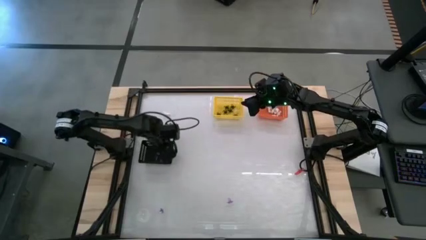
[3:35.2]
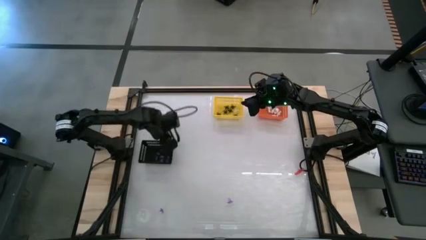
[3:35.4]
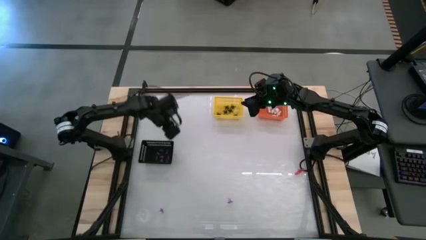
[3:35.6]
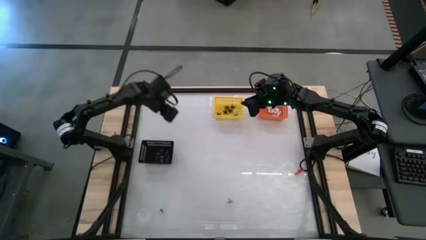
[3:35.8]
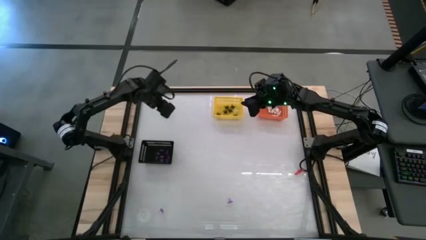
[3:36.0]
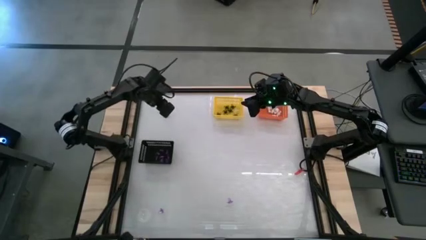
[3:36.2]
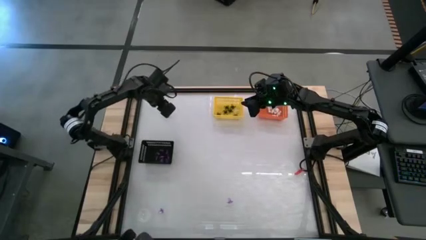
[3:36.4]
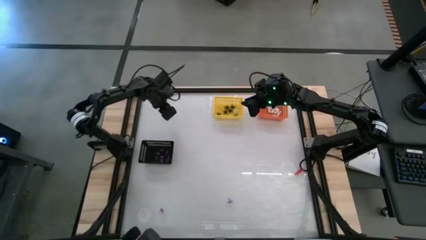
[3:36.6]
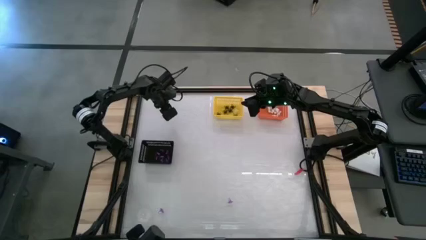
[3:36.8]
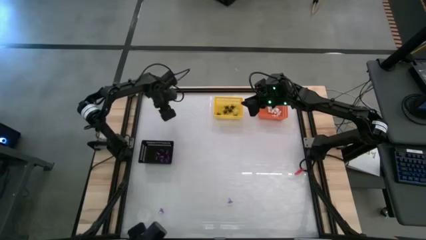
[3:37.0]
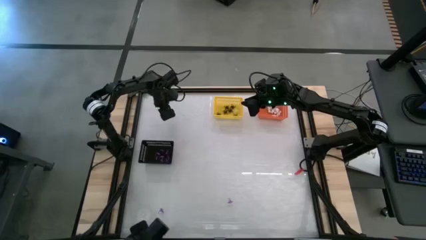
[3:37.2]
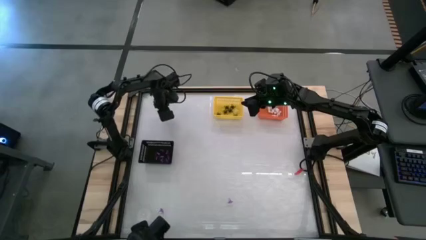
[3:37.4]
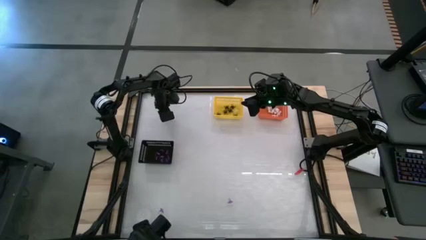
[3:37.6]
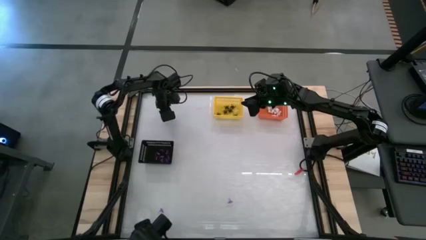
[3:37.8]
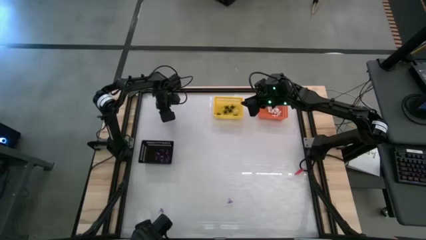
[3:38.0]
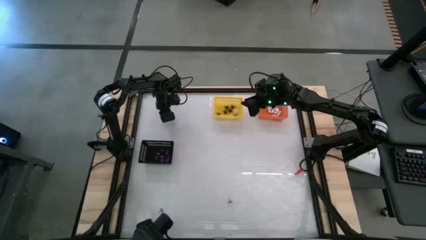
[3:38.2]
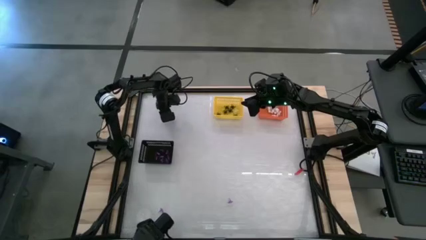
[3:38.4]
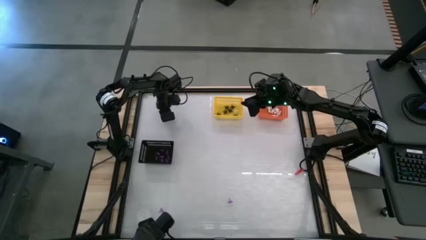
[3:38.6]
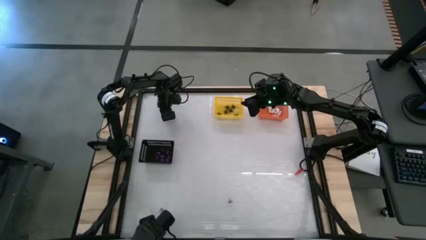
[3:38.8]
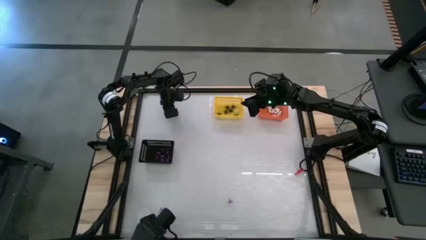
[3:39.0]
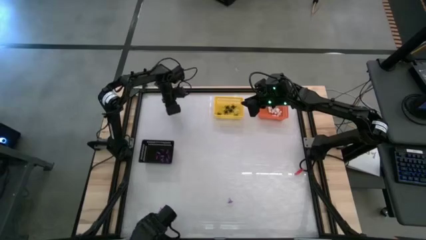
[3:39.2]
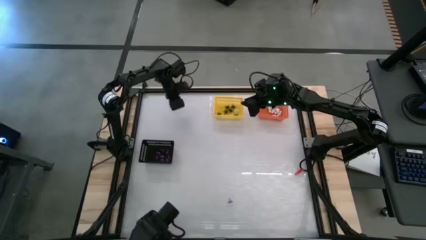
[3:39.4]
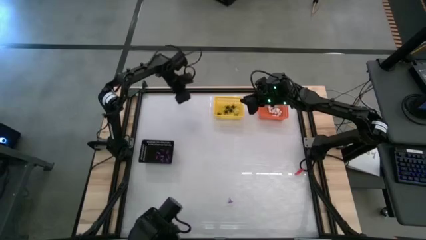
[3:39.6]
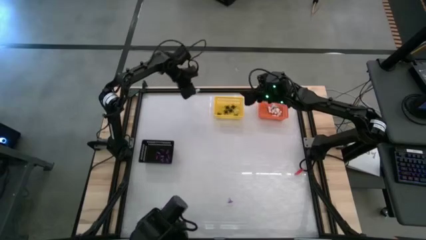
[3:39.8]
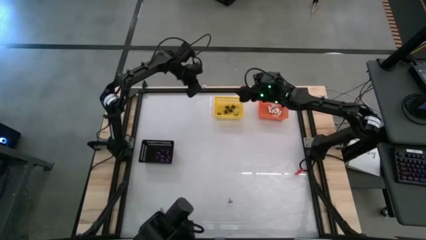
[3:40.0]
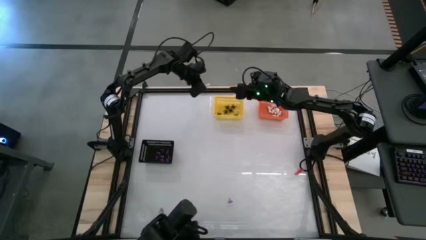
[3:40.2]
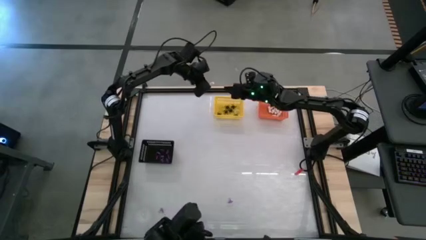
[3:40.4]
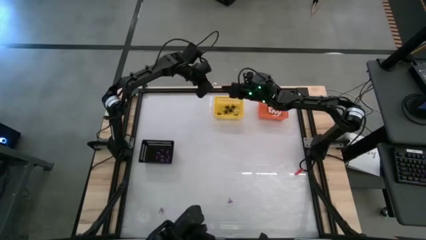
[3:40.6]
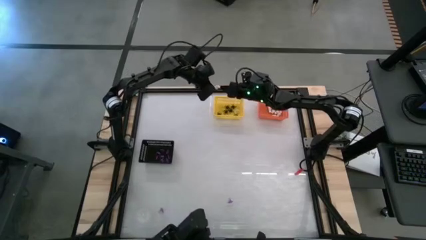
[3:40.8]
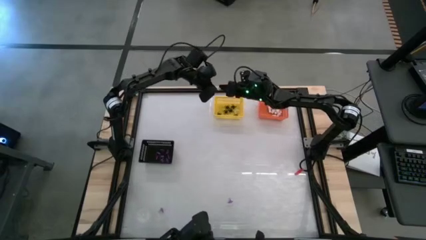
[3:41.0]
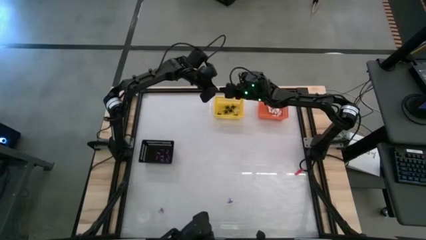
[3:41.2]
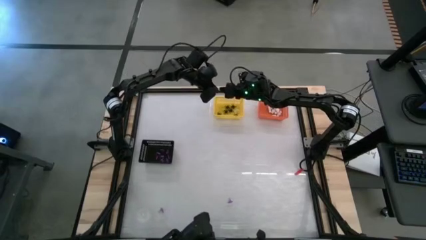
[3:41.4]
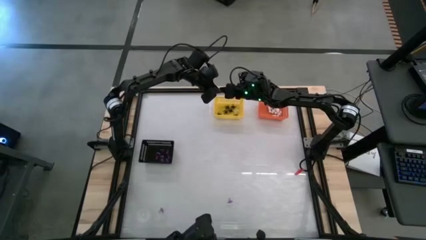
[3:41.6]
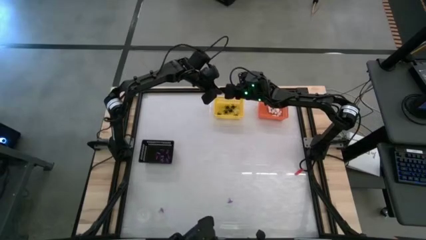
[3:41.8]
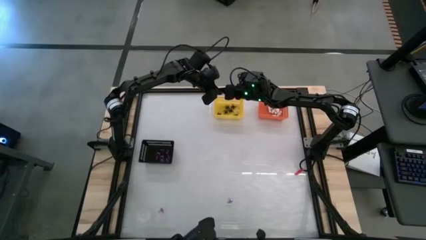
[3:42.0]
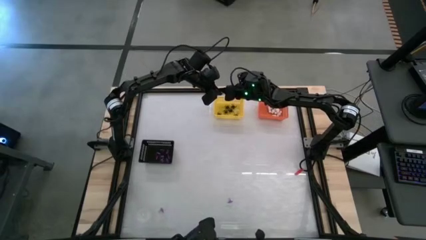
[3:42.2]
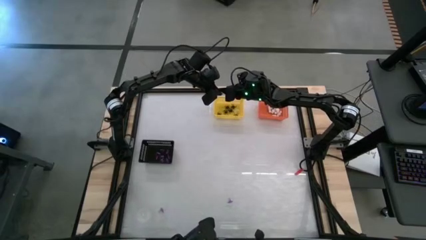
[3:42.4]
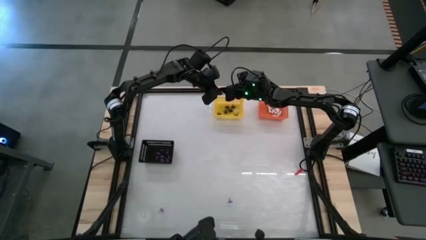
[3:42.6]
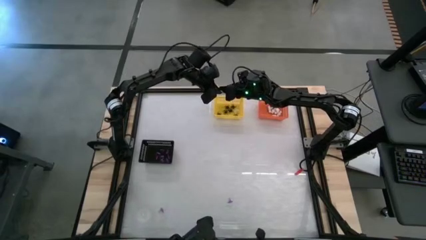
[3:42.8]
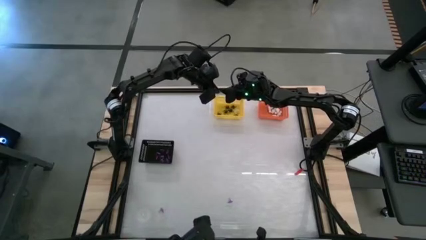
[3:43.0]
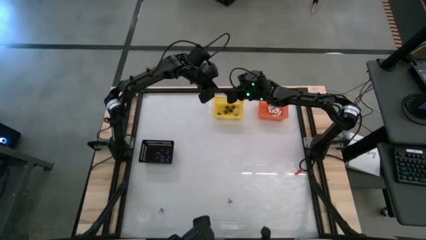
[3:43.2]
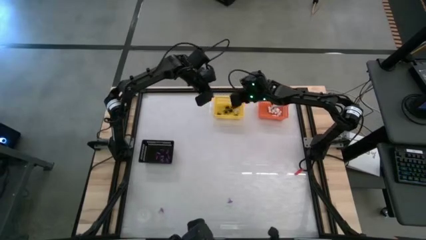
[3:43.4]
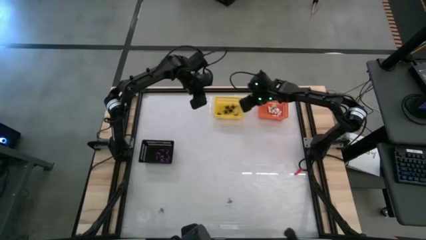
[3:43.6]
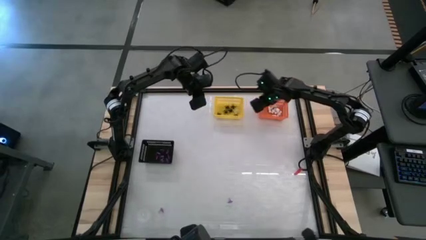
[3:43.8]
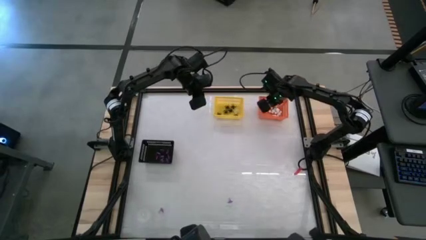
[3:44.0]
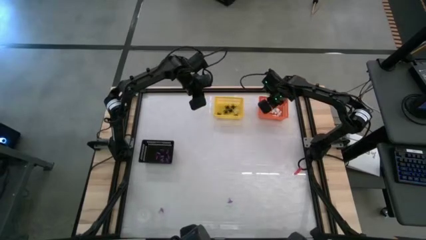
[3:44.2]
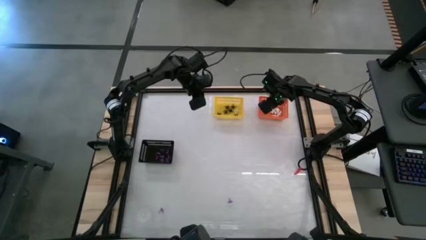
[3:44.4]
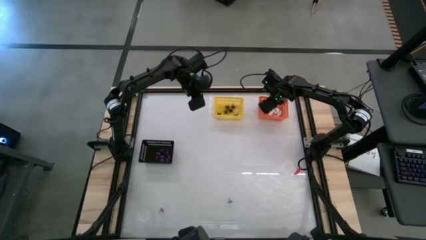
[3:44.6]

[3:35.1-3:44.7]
Task: Sort Halloween decoration
Put the white skeleton toy into the orange bin

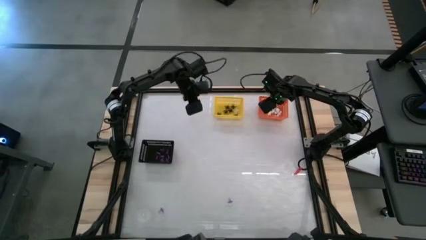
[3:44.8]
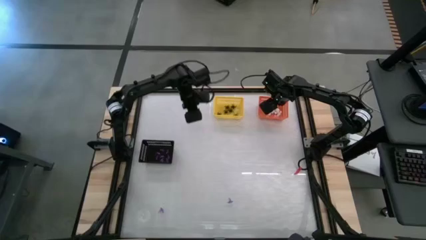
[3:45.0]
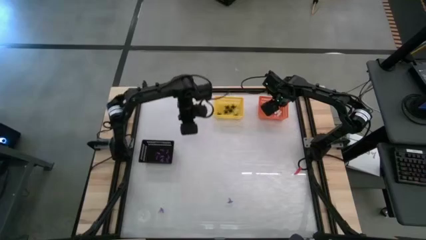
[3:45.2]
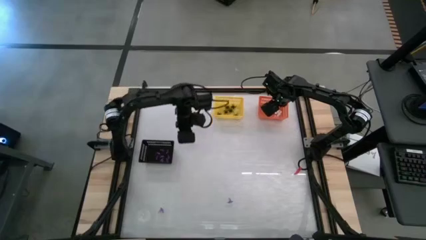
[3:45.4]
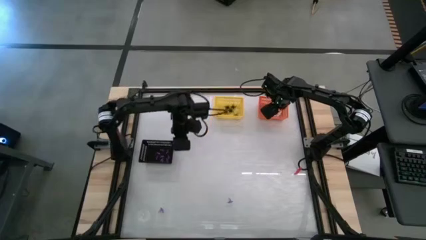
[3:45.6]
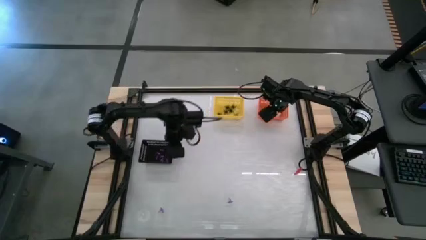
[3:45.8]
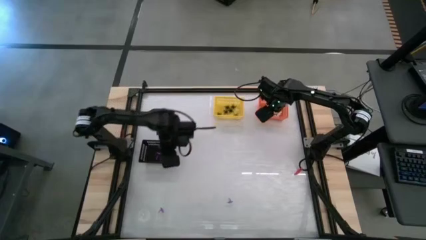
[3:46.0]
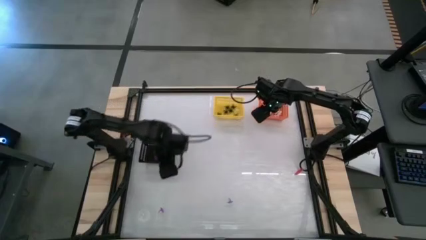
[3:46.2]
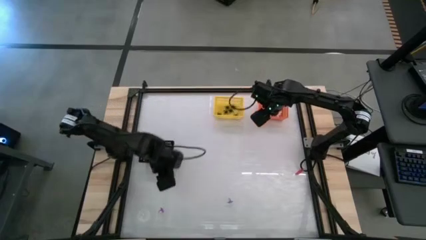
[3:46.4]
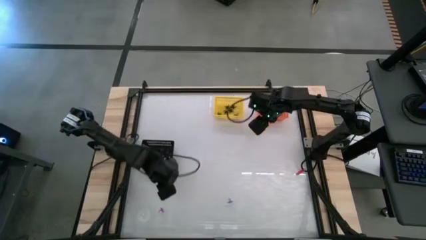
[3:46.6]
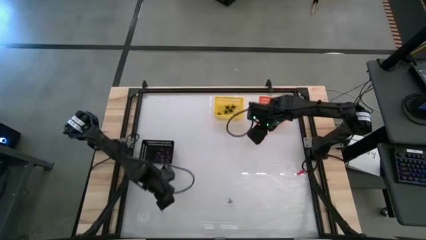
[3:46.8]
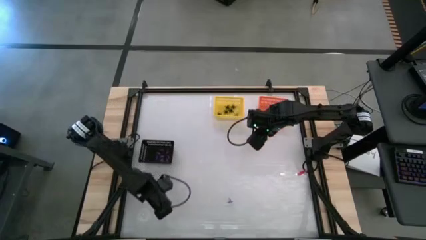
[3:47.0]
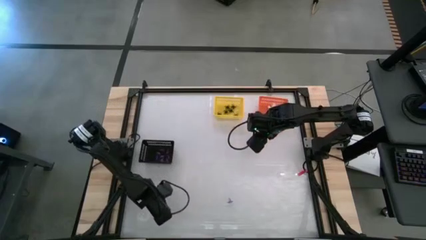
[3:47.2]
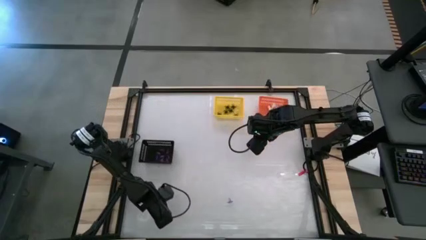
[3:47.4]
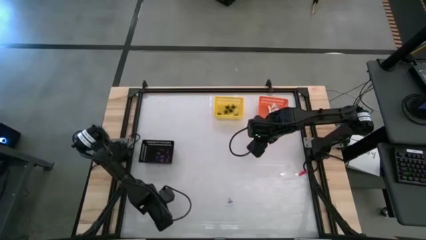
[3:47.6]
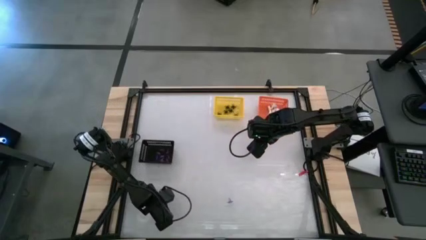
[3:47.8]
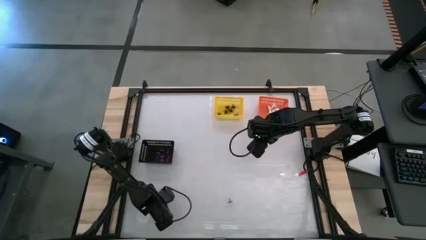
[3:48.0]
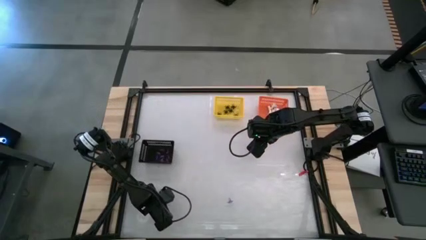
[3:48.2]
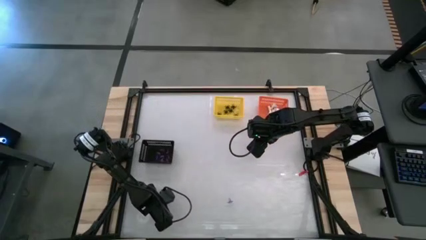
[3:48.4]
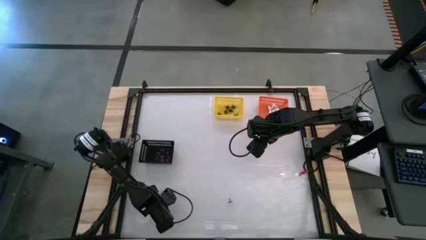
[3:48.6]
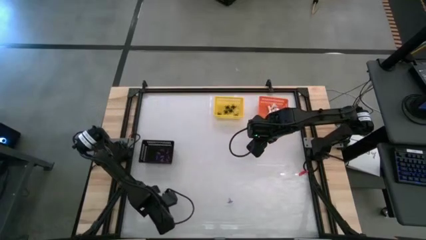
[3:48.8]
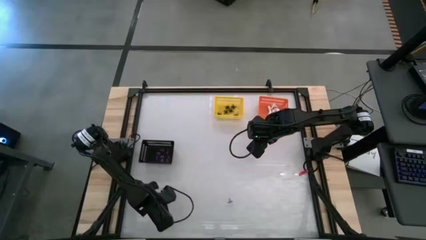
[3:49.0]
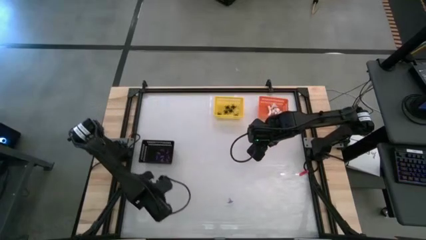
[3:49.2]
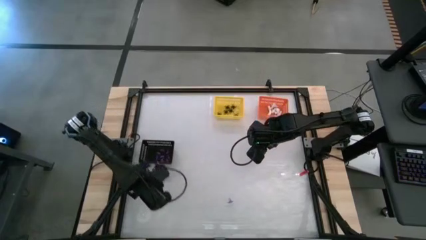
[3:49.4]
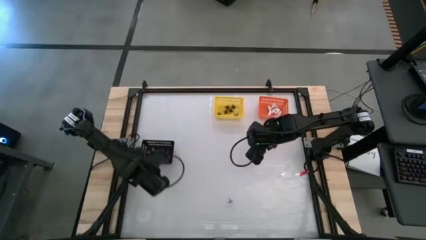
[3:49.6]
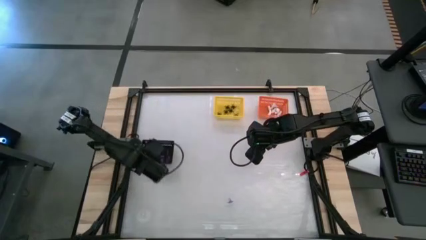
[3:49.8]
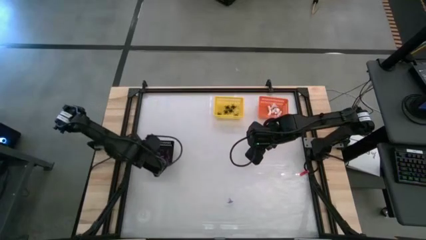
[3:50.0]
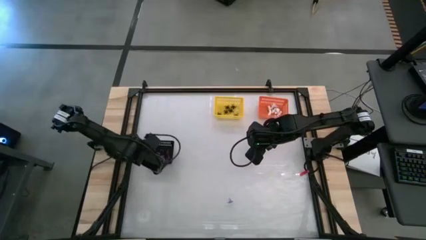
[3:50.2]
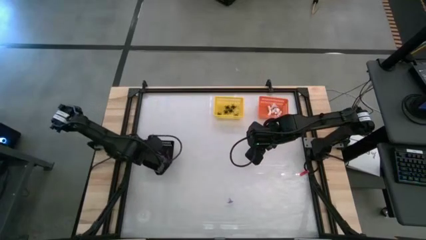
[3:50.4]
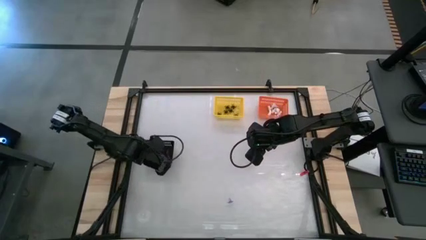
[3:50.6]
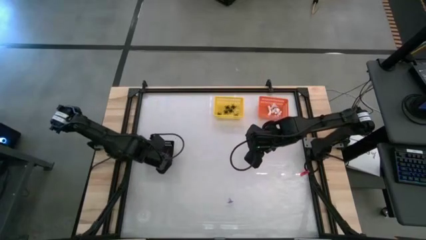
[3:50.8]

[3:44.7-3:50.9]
Put the purple witch hat toy into the black bin

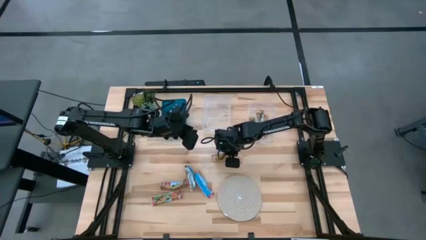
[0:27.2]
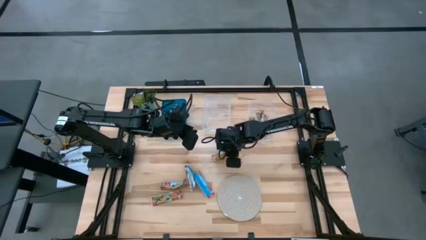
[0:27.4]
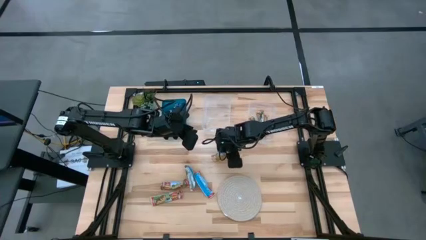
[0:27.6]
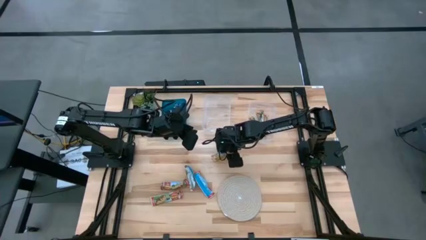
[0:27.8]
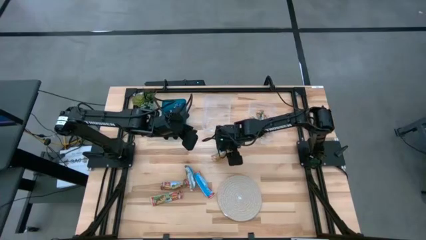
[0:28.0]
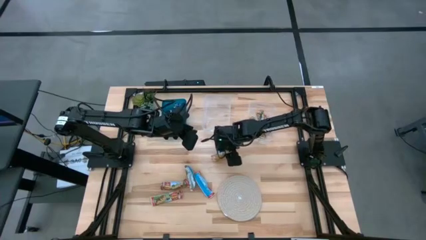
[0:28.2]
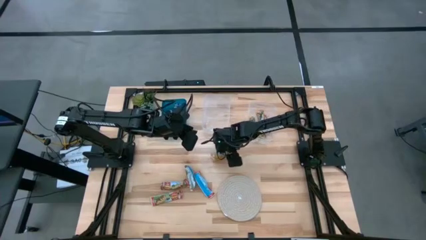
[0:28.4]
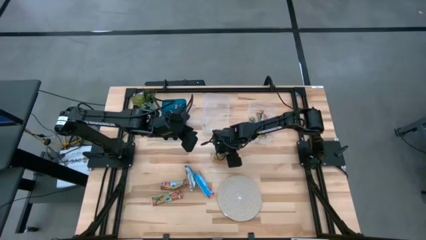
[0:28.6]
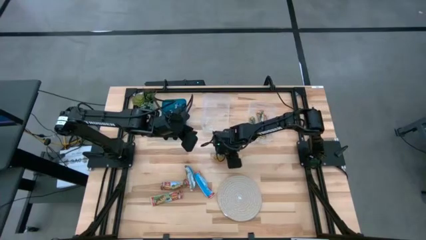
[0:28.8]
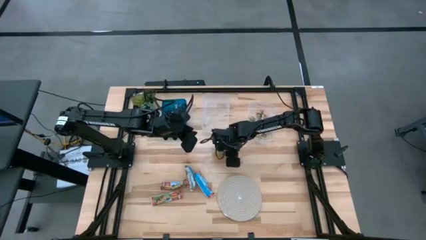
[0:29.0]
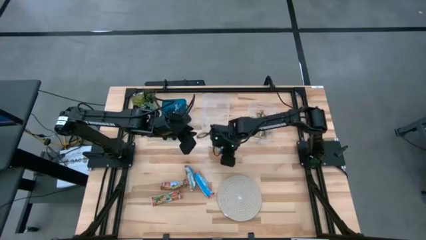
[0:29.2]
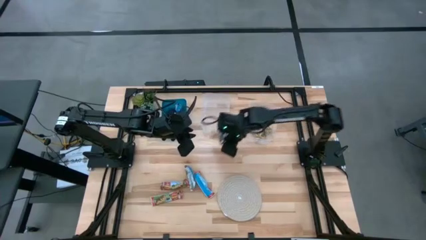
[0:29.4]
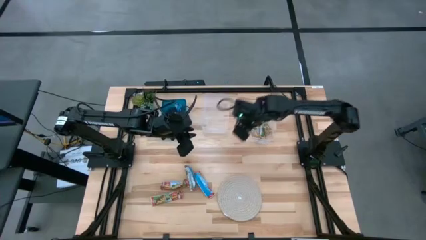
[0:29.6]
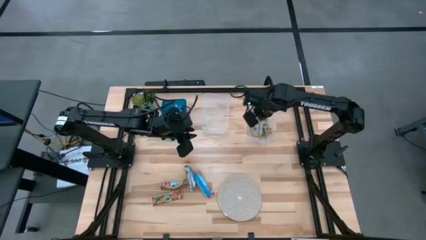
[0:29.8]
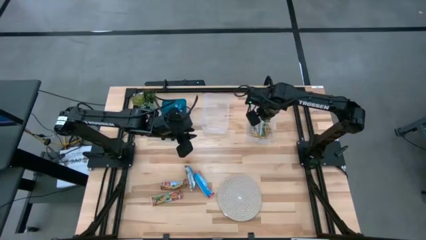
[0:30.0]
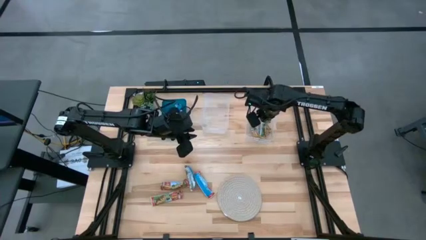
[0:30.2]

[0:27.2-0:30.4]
Task: Pick and place Granola Bars by type
Put the yellow granola bar into the right transparent bin
